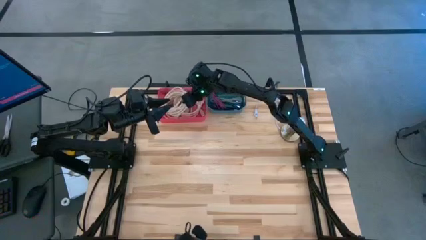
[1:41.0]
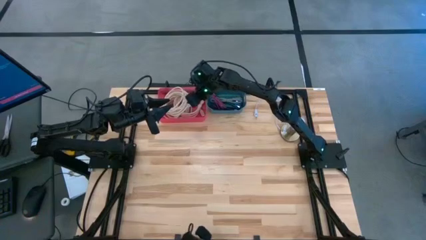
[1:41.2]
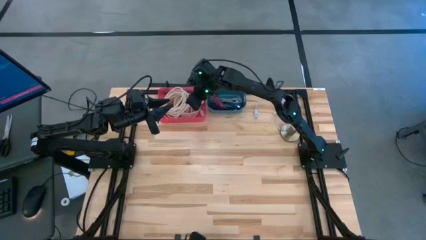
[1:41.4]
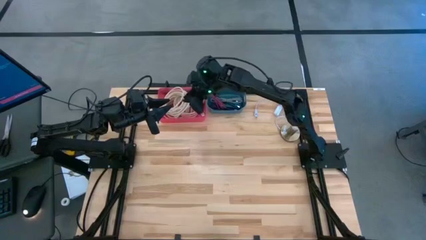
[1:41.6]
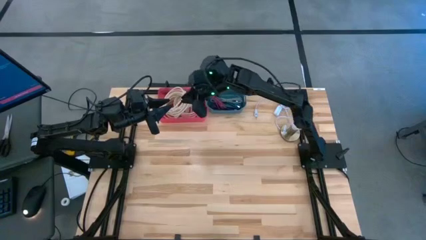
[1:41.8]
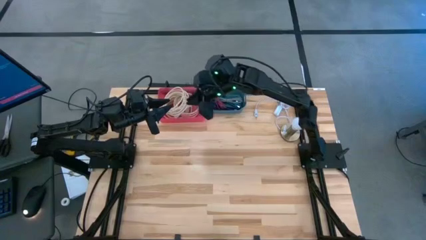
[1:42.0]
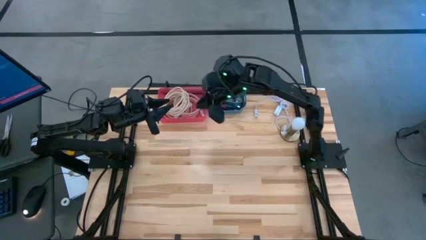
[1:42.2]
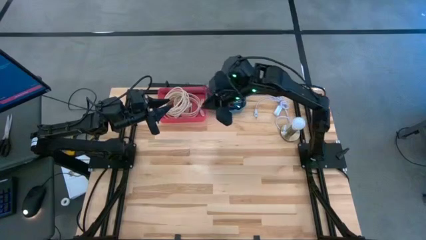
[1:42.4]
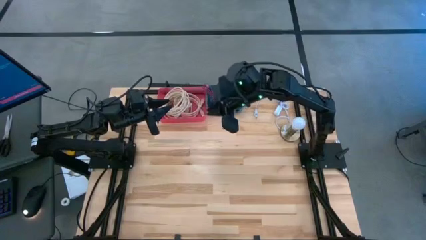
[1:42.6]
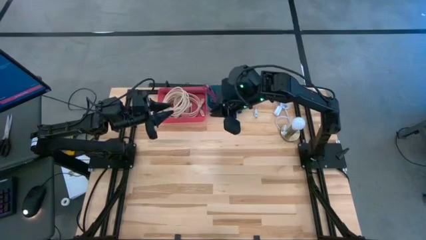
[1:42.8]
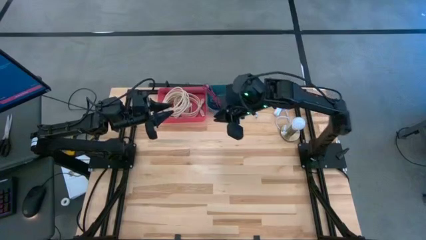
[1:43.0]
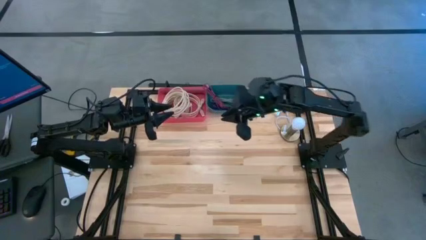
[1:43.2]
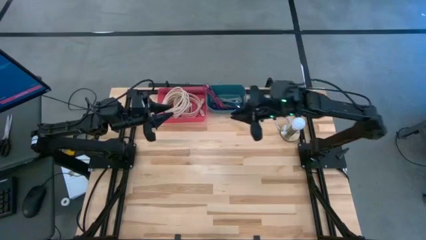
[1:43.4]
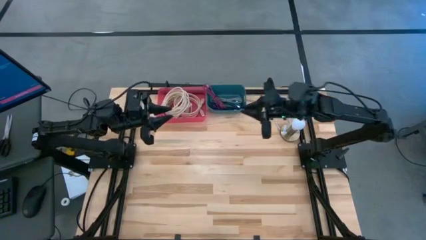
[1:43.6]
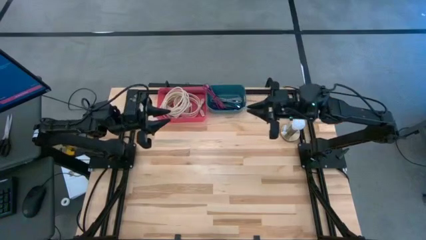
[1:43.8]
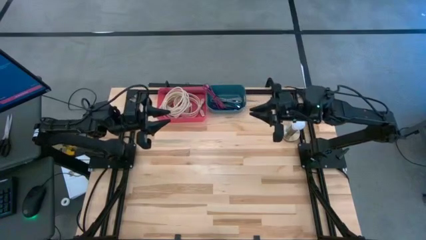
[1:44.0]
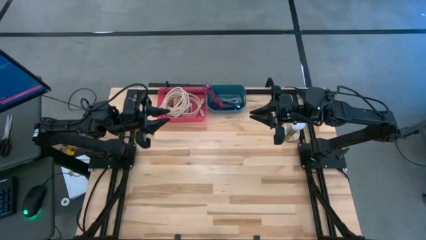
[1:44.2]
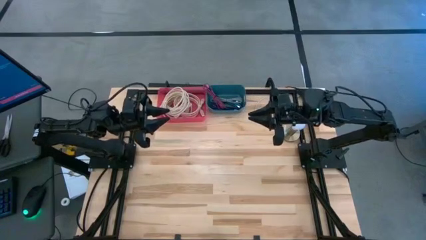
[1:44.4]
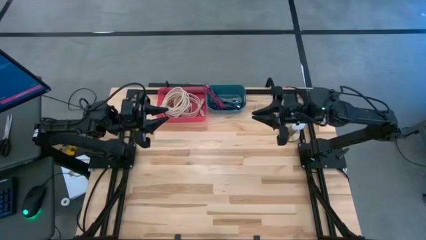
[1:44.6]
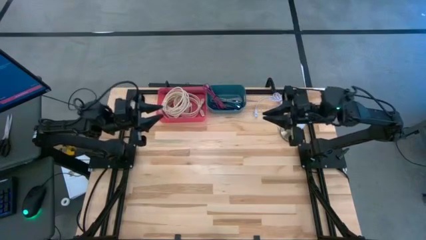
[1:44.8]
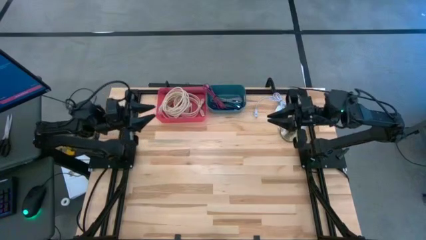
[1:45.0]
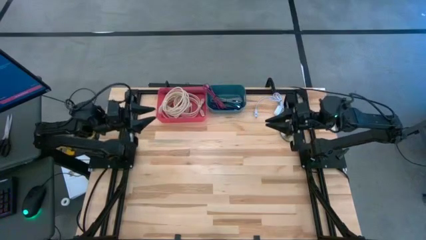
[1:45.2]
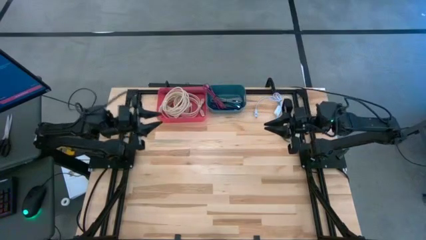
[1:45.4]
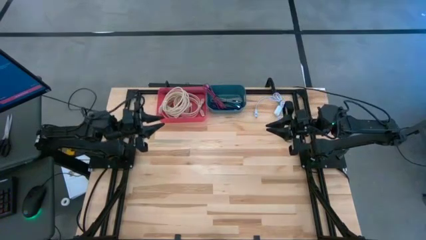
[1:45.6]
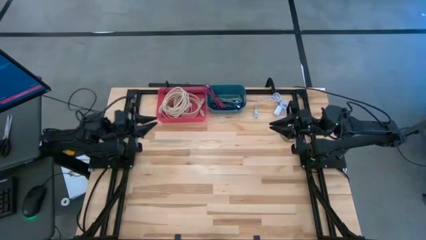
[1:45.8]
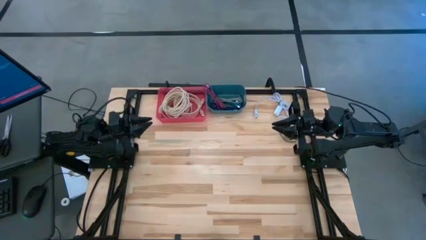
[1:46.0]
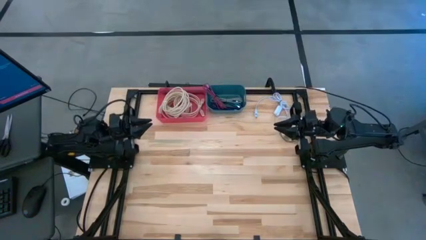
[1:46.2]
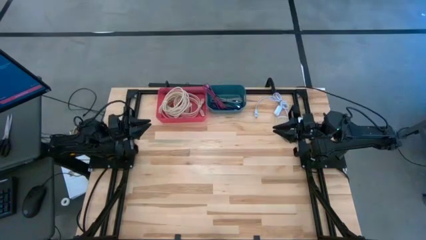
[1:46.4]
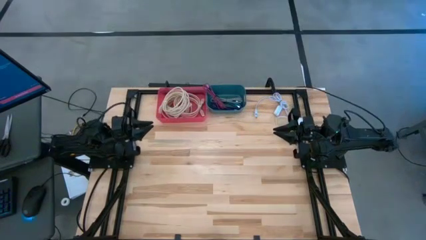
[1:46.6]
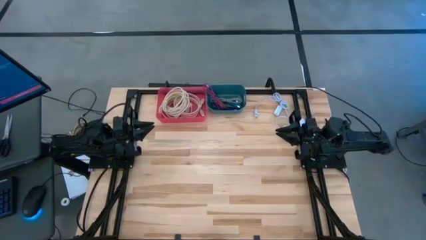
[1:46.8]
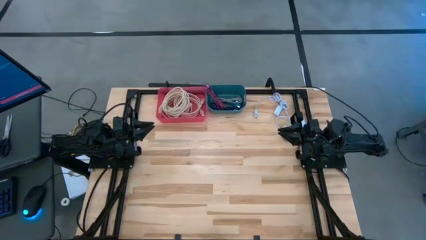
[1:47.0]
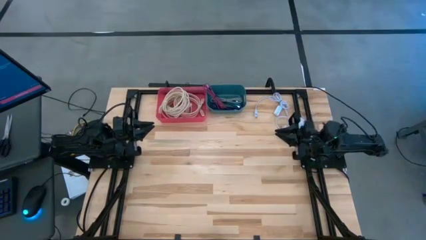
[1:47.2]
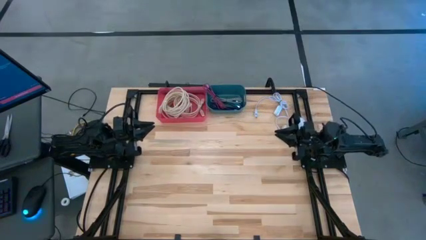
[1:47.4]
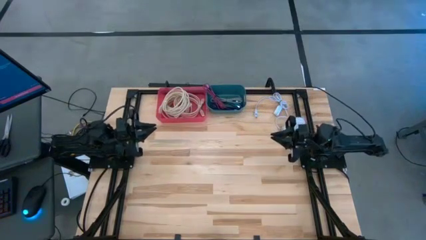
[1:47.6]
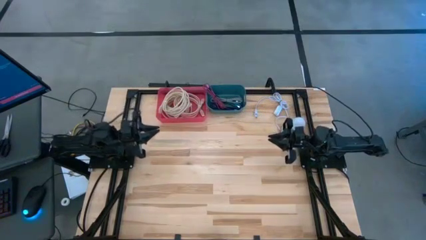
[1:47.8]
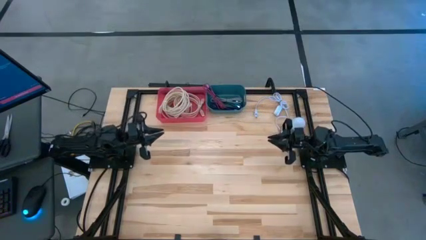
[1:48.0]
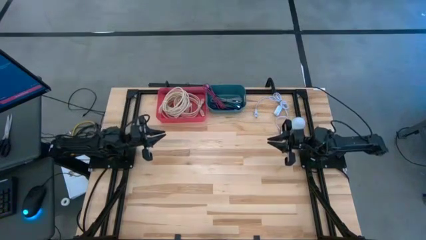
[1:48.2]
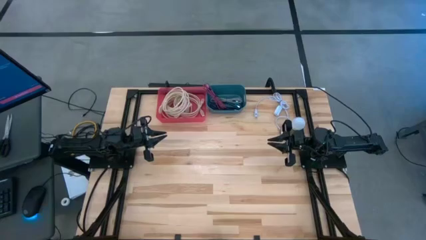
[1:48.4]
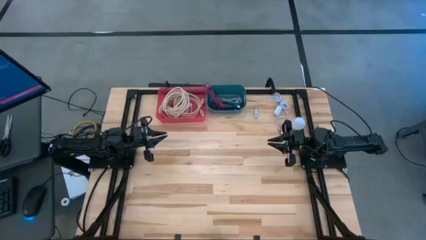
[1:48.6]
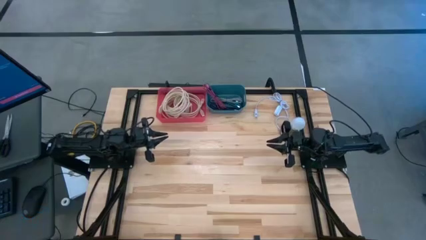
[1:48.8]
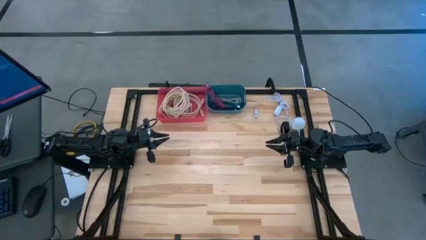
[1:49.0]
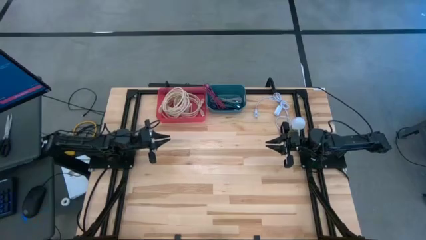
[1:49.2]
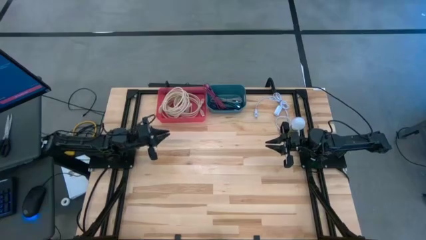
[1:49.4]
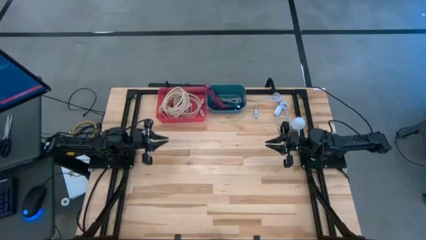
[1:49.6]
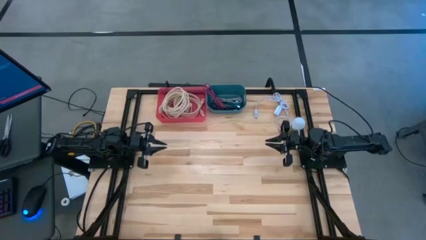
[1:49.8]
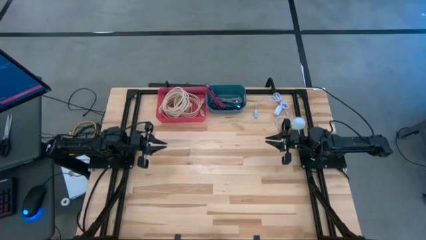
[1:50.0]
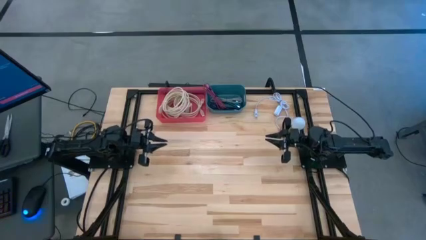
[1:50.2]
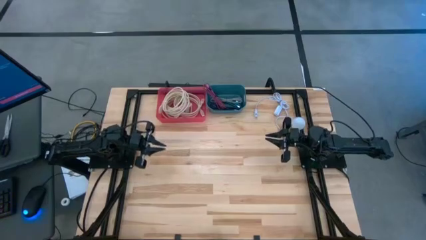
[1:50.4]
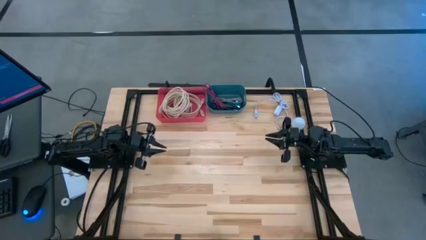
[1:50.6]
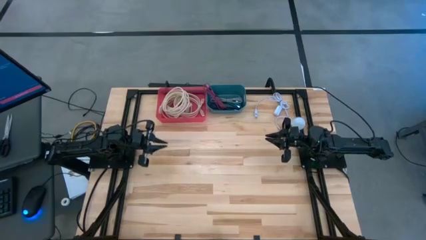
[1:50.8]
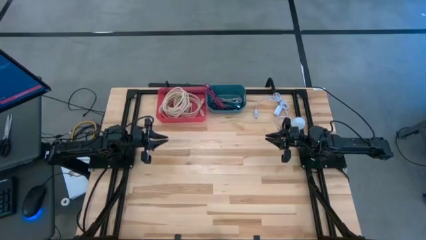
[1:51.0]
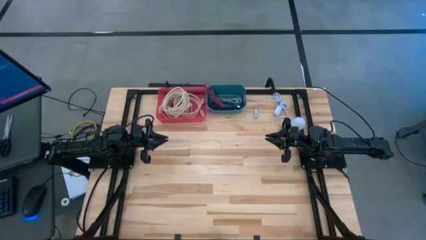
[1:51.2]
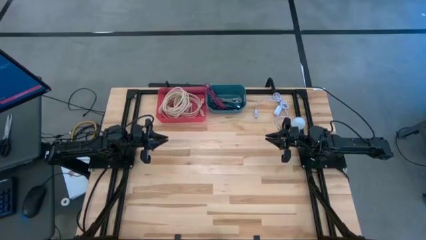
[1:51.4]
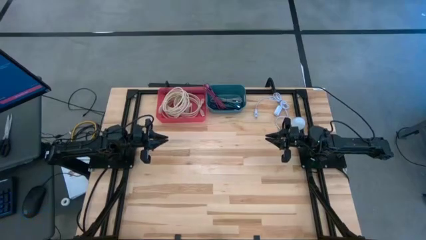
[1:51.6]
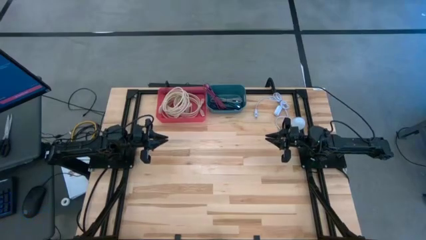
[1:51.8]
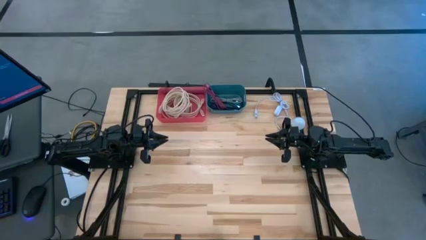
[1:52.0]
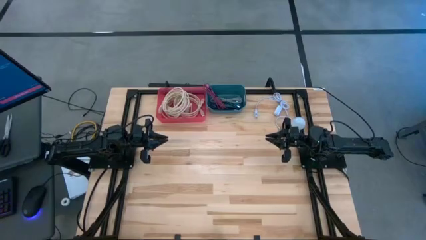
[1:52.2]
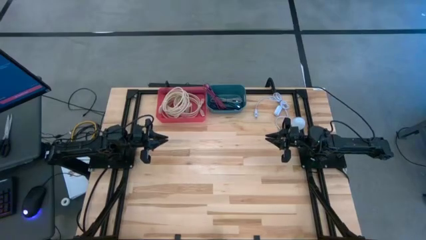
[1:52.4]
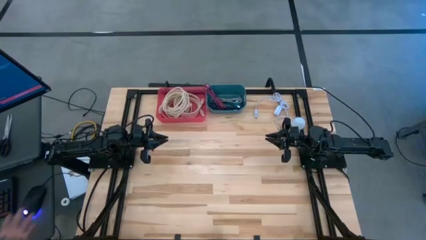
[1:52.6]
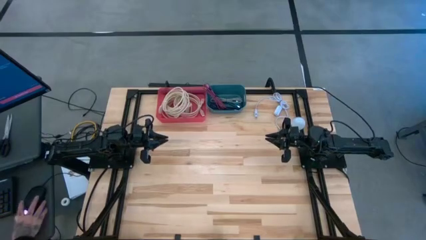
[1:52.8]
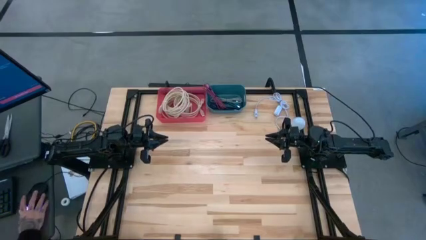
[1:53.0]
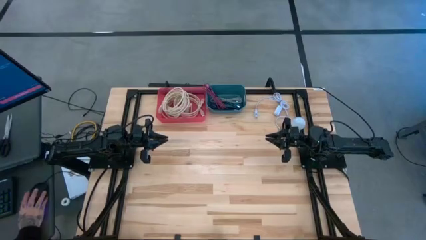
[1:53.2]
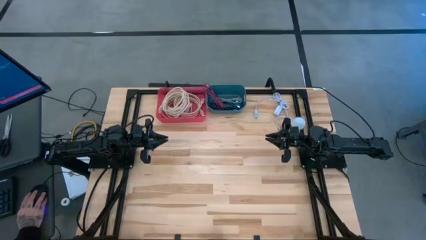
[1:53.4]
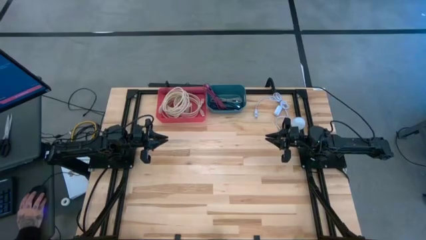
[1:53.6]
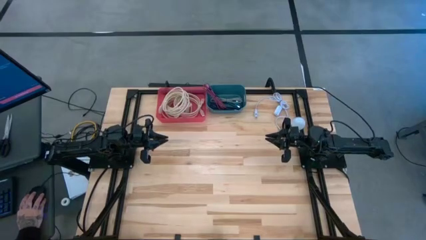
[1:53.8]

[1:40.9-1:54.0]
Task: Pick & Place USB Port
Return to Home Position

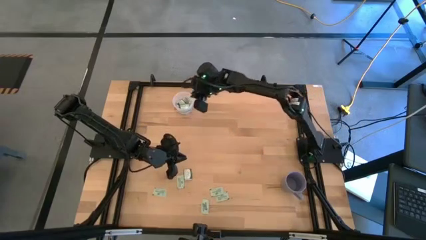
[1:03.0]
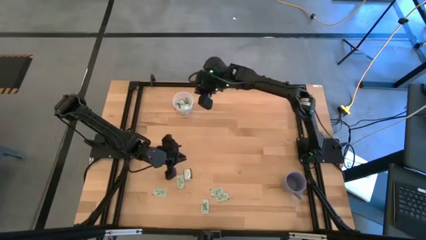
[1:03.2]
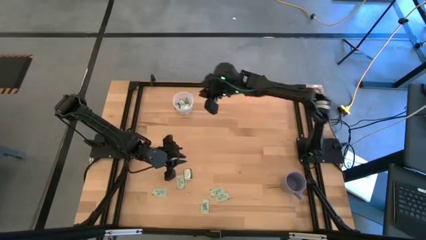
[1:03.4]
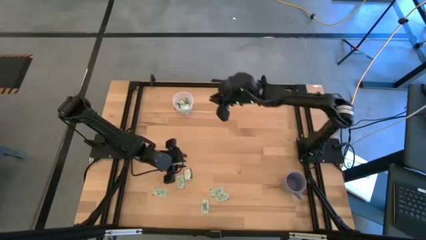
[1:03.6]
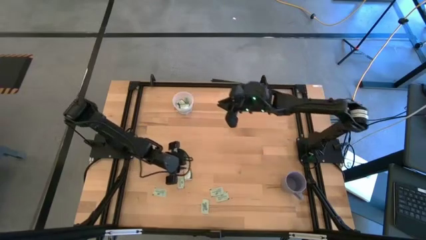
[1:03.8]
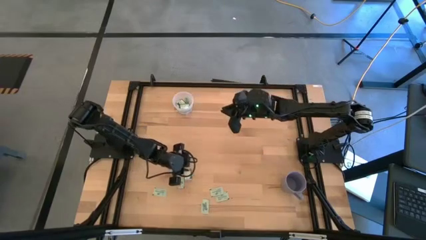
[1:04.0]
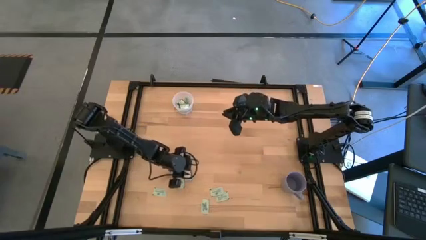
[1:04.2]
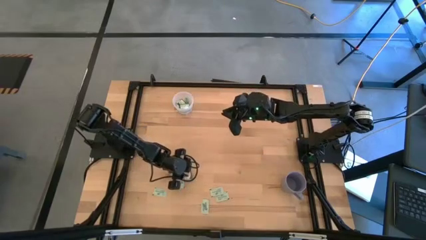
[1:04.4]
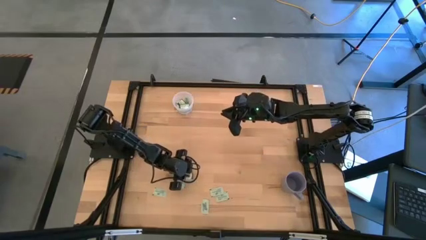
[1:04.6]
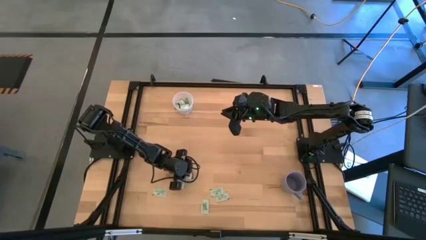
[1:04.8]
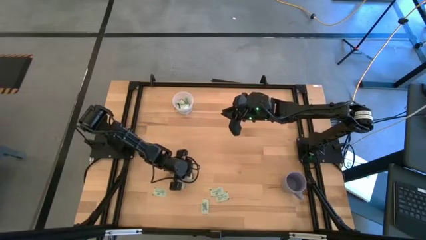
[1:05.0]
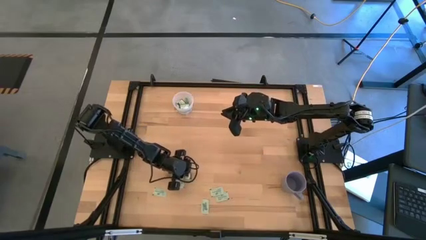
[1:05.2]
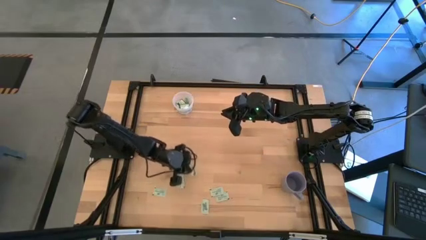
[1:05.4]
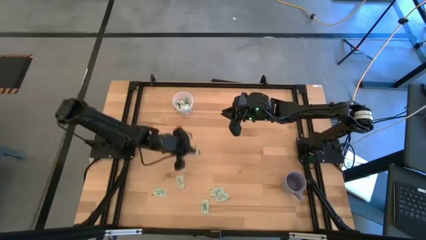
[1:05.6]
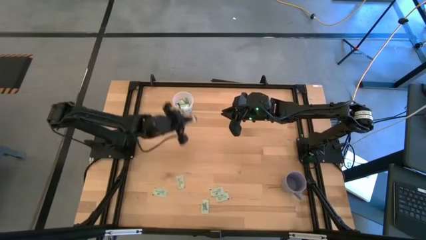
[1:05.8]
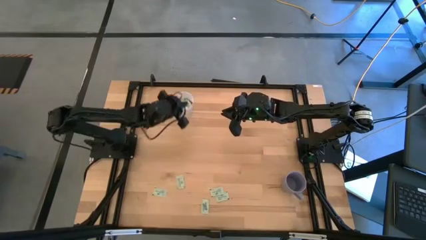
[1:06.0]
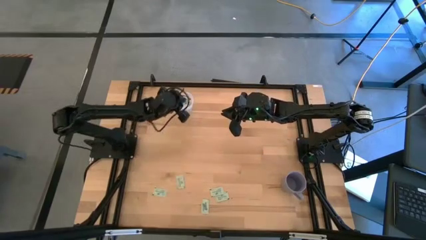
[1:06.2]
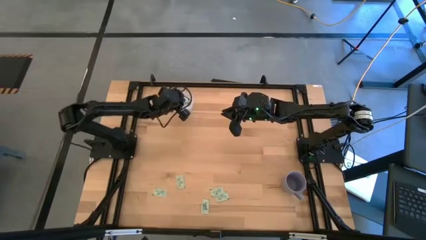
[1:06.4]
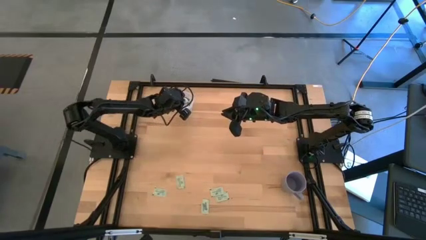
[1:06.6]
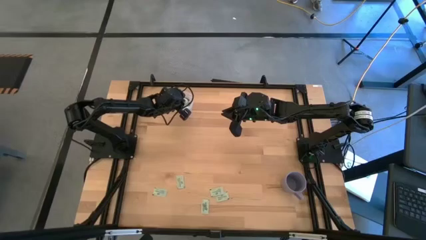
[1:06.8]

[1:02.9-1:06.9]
Task: Pick and place items into bin
Put the truvia packet into the transparent bin
